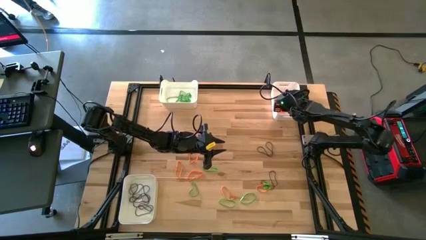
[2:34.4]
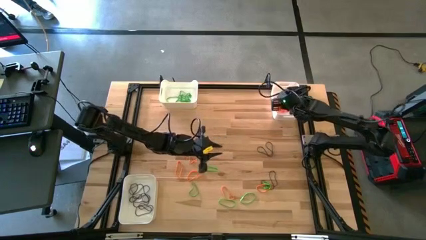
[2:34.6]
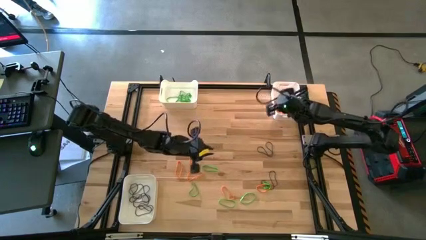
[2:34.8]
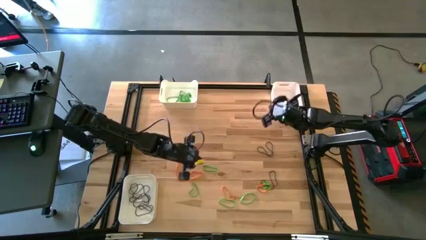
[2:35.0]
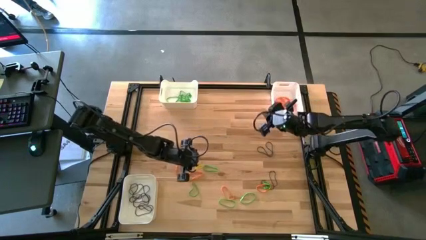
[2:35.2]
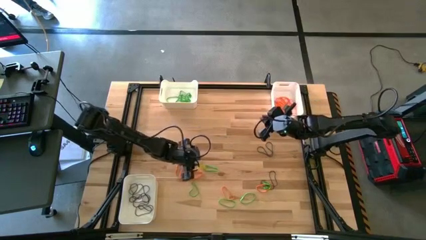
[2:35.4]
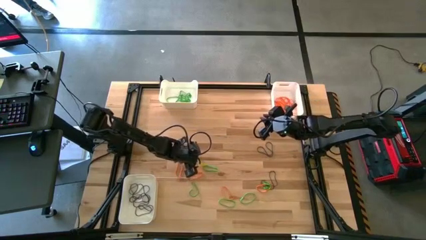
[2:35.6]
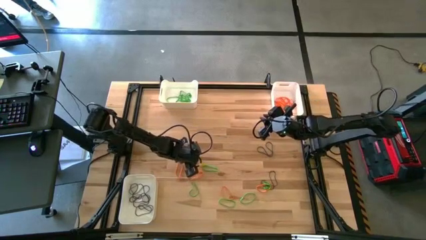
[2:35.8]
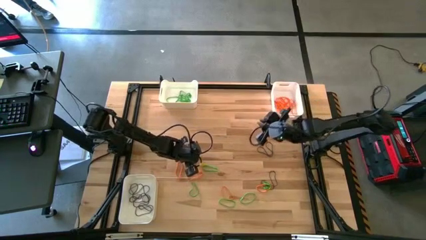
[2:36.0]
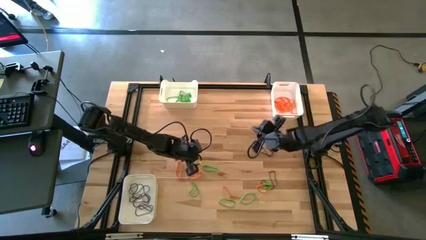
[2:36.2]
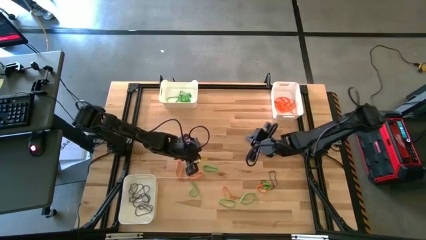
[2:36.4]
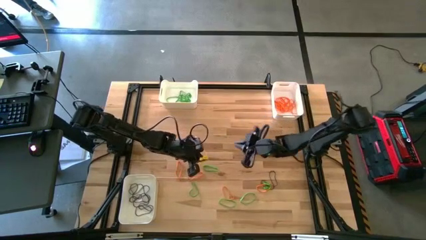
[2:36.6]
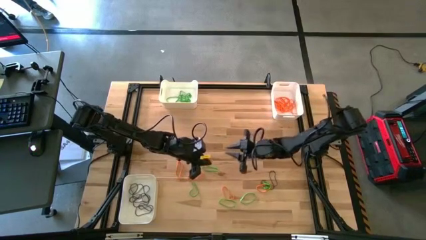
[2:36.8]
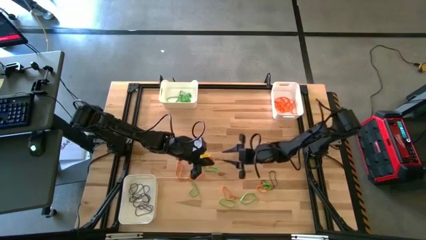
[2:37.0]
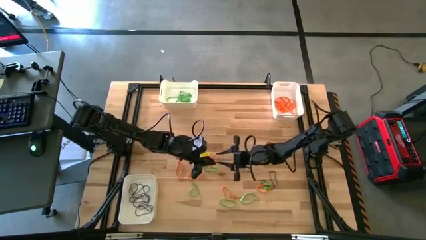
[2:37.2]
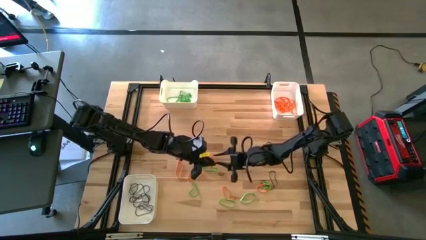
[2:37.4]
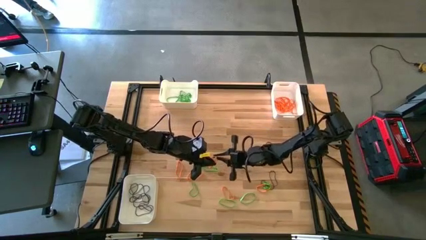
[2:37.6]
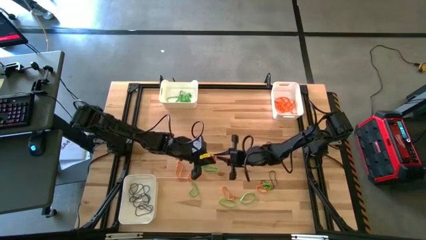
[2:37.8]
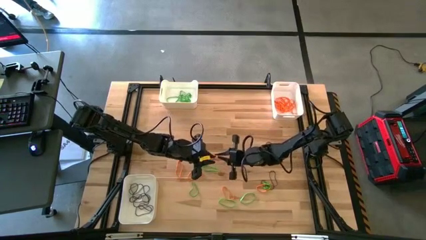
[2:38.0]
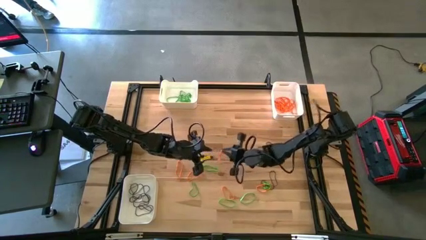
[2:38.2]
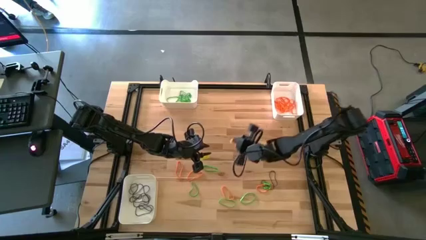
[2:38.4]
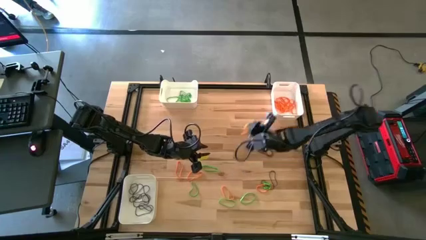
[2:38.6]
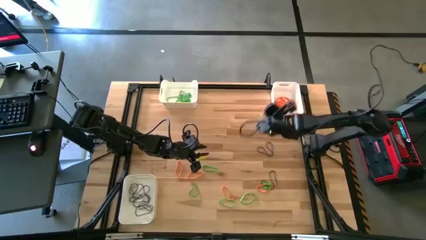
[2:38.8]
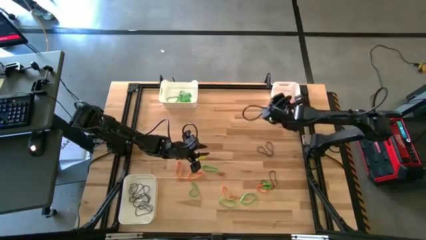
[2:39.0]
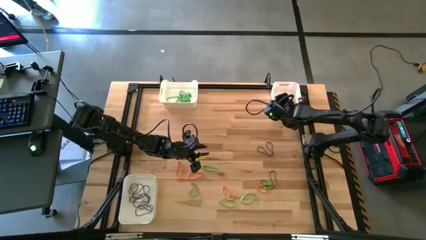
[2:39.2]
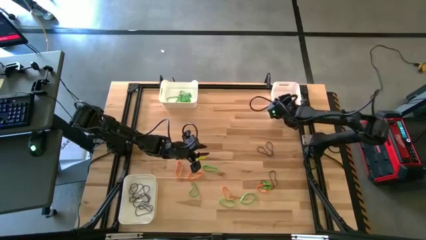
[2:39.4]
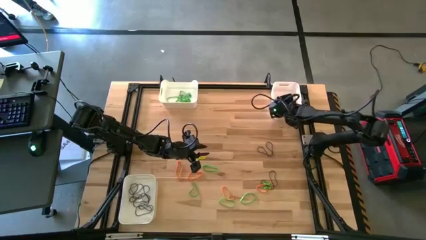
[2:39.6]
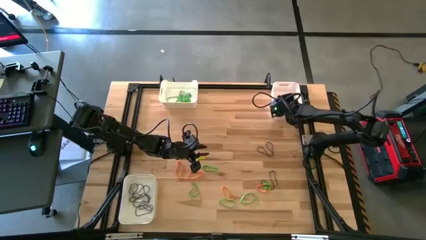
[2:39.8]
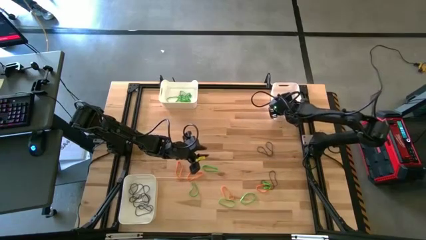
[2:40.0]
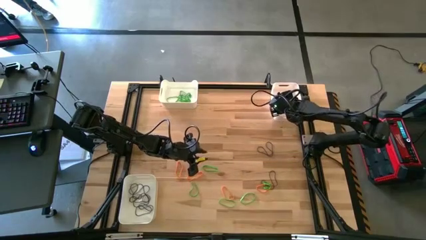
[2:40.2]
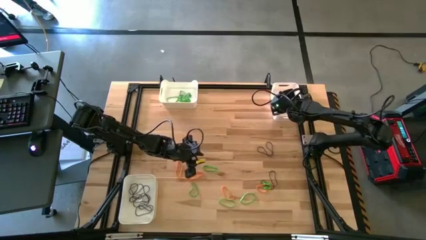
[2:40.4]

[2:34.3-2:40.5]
Task: Sort rubber bands into baskets
Put the orange rubber band into the top right white bin

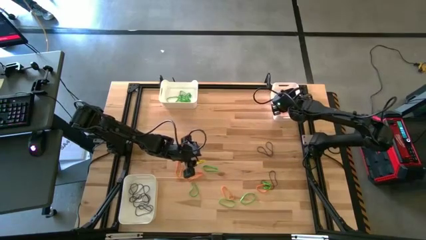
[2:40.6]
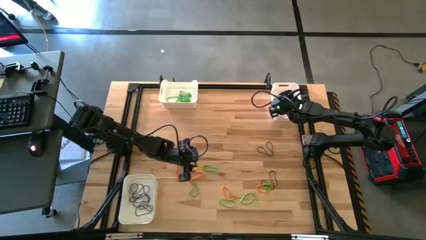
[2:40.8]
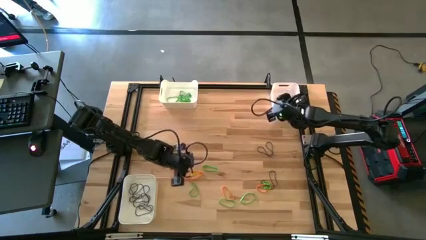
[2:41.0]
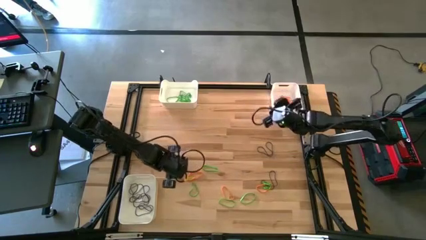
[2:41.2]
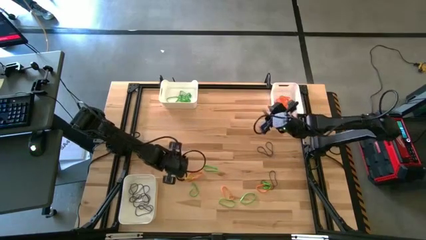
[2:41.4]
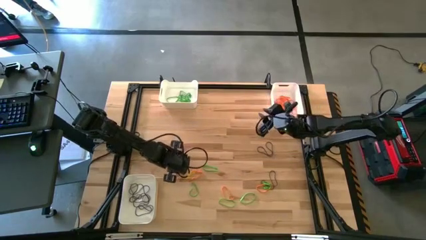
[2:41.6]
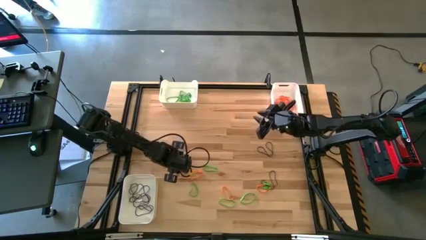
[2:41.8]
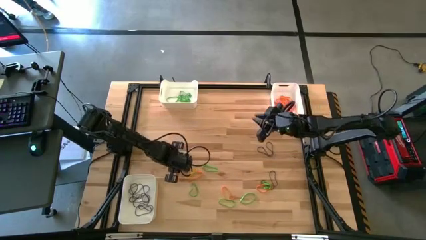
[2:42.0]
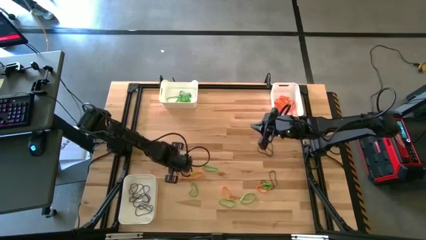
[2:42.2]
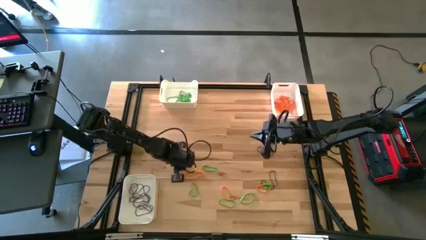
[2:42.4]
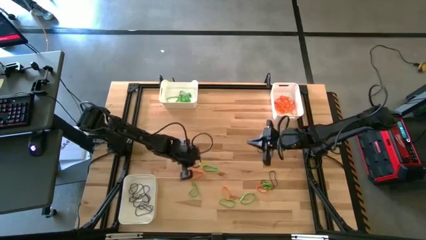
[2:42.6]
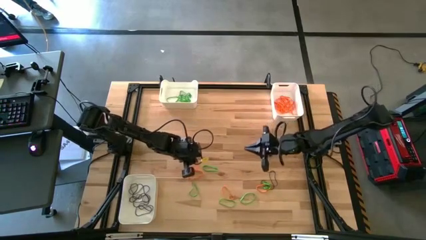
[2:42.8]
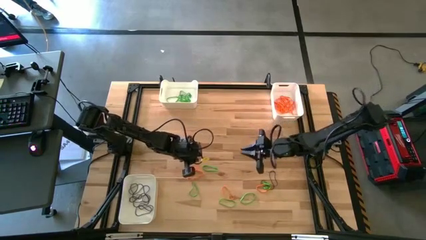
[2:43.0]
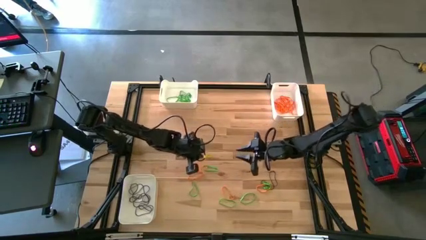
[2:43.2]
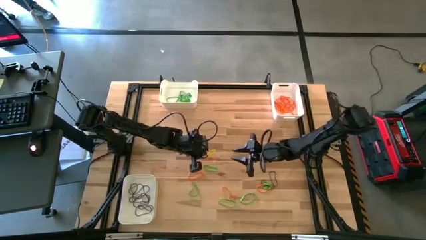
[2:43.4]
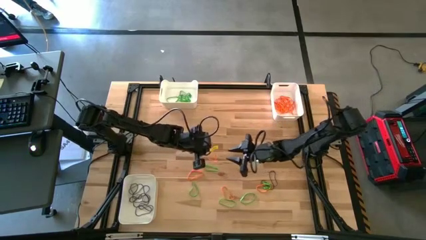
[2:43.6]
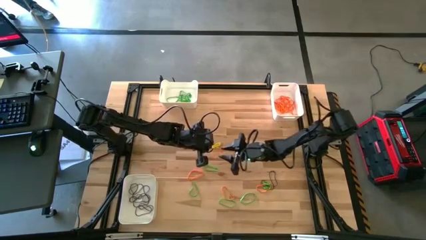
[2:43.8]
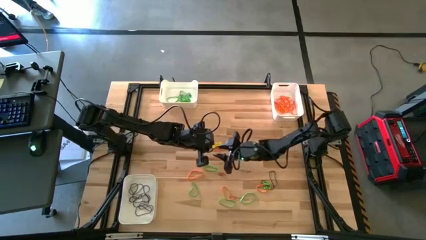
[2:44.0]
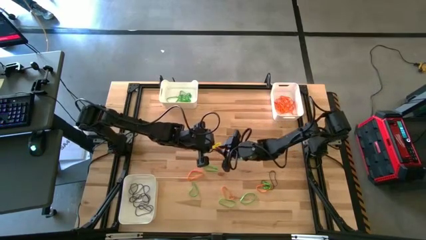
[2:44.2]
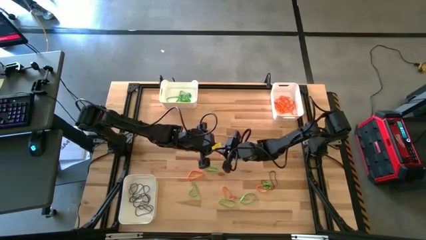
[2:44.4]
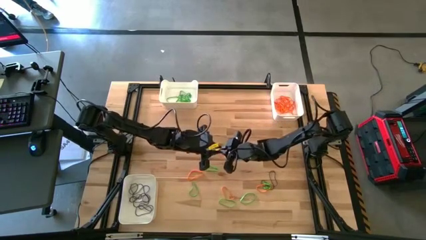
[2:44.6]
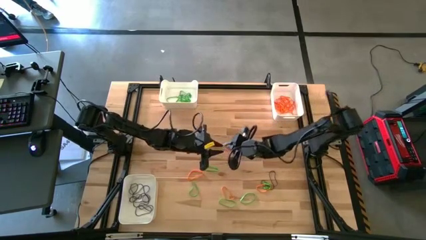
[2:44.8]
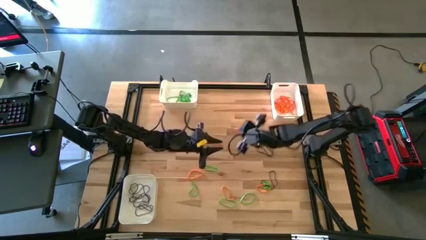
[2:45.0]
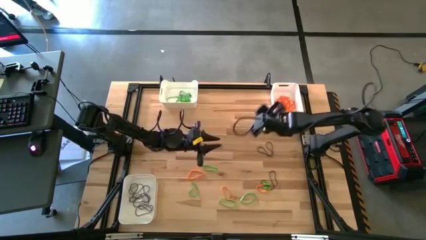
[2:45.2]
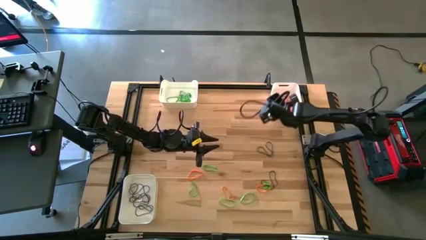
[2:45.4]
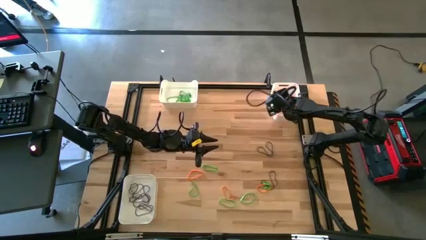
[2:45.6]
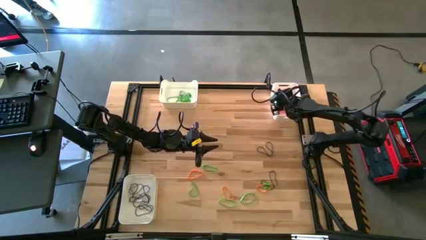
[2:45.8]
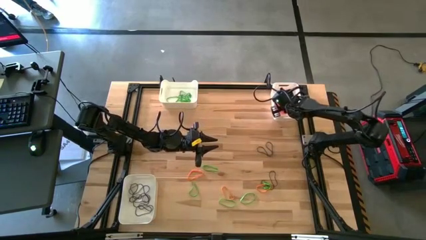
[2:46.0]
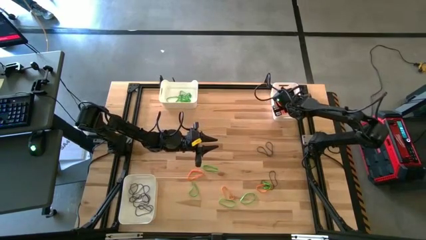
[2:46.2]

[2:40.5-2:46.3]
Put the orange rubber band into the top right white bin

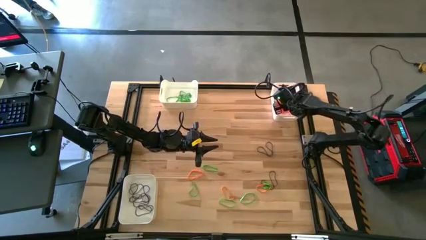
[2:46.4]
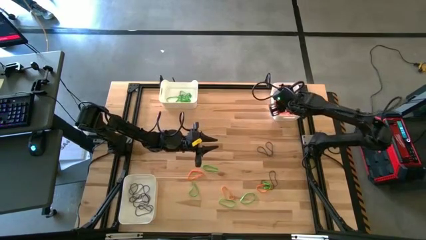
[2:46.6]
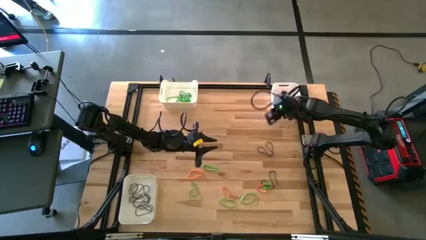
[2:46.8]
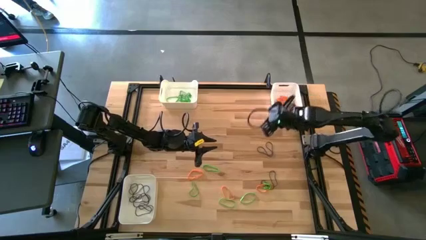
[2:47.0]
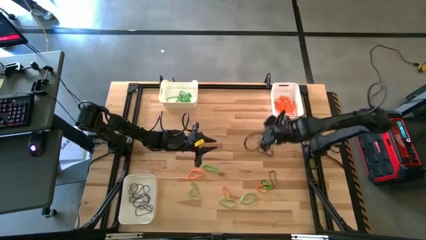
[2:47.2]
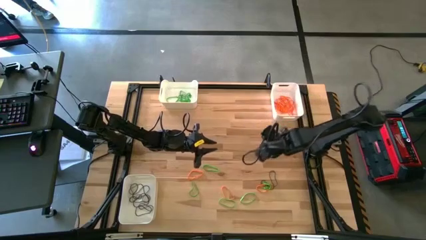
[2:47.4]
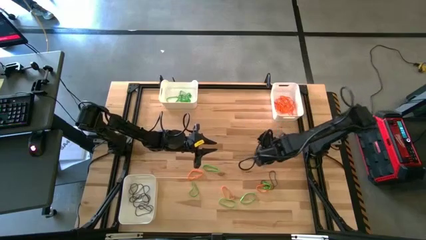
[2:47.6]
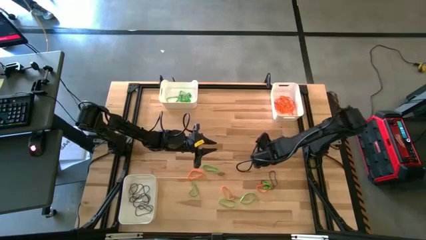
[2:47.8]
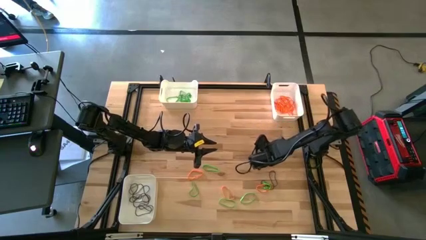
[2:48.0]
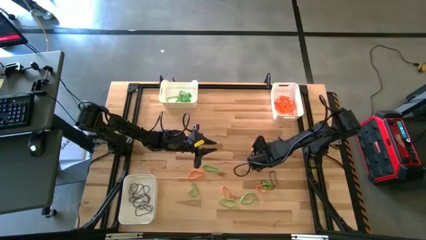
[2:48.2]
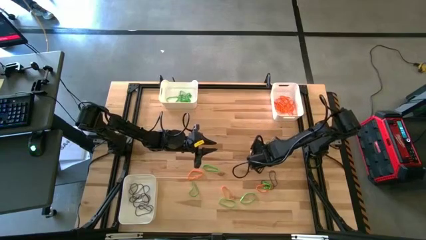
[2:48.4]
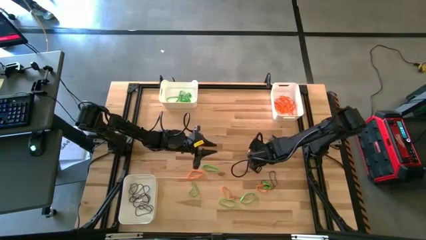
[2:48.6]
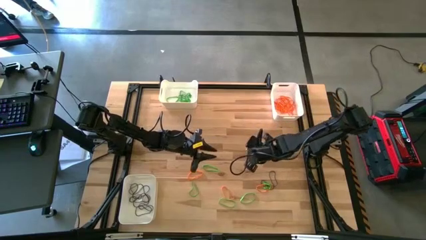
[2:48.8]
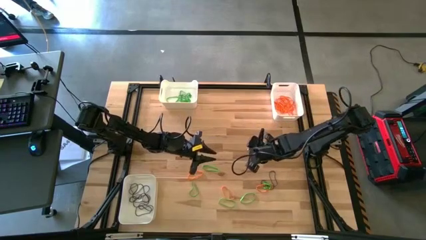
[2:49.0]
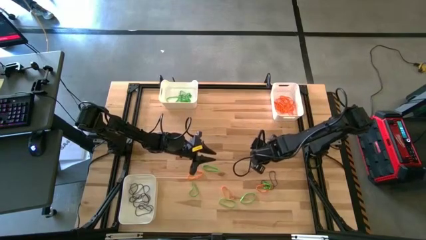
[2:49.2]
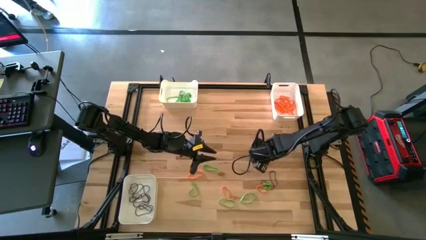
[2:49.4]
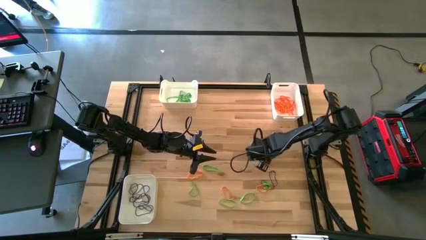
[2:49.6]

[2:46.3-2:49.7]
Put the purple rubber band into the bottom left white bin

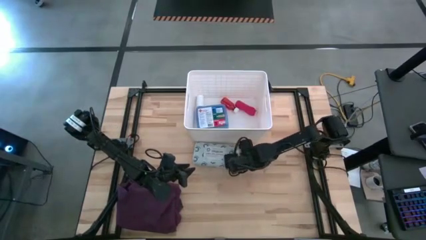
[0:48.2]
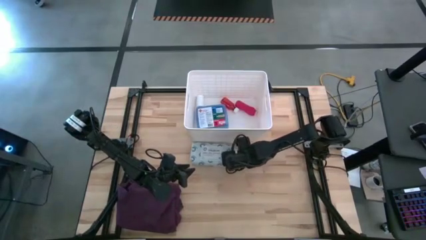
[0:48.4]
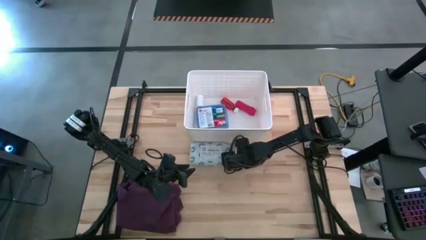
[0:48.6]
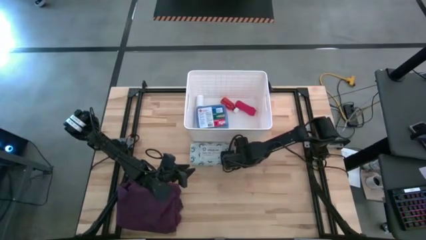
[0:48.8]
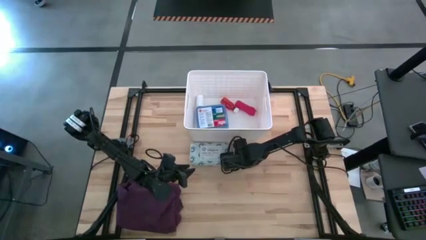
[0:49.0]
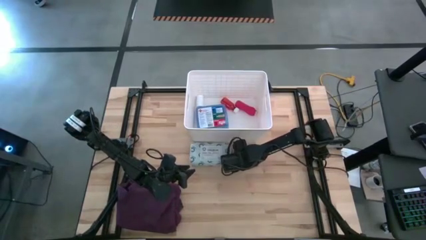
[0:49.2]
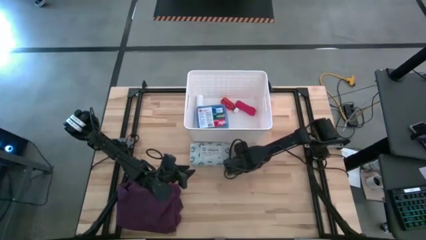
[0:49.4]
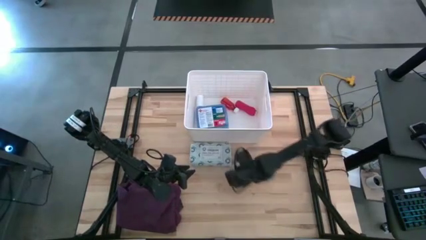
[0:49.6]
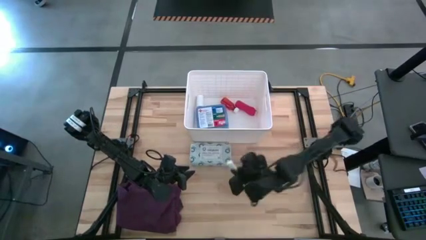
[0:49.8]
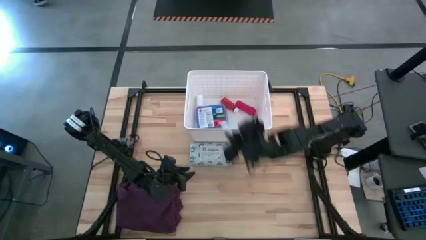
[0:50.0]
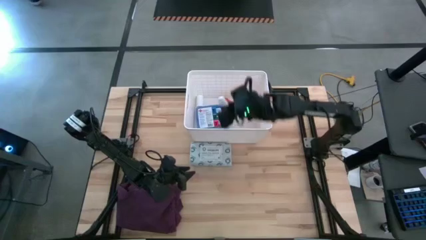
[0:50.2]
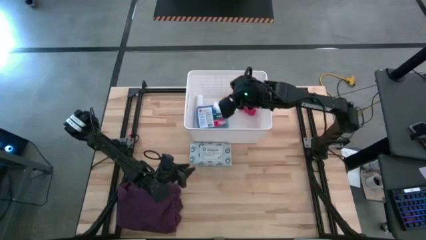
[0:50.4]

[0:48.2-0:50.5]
Task: Pick & place medical supplies in basket/bin
Put the white rolled gauze into the white bin
